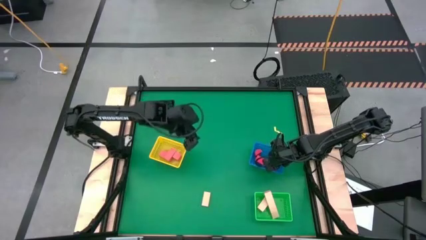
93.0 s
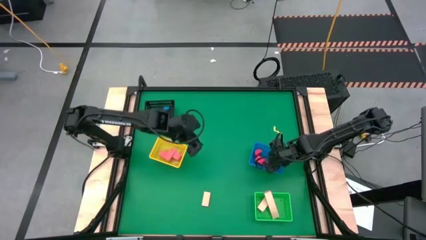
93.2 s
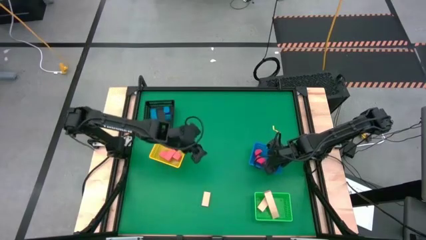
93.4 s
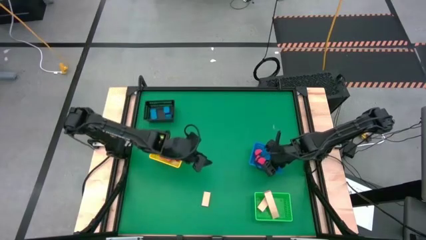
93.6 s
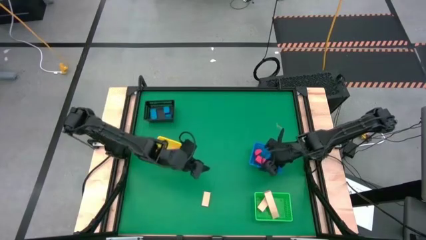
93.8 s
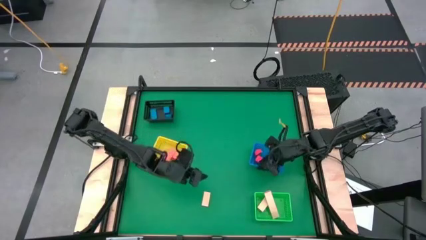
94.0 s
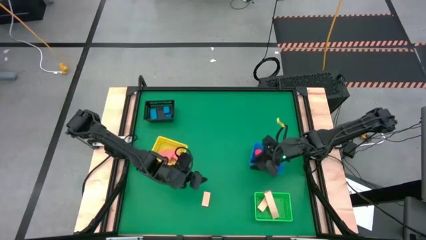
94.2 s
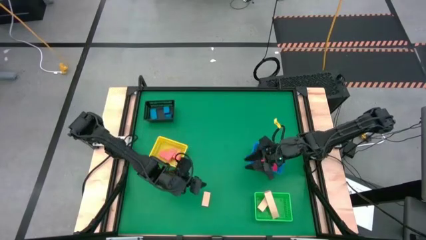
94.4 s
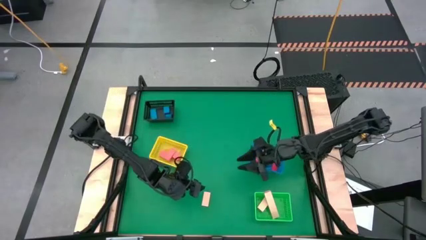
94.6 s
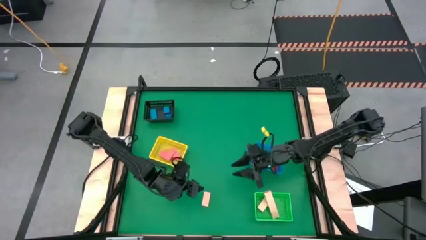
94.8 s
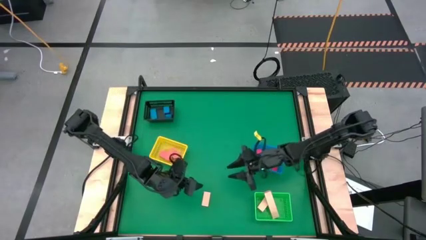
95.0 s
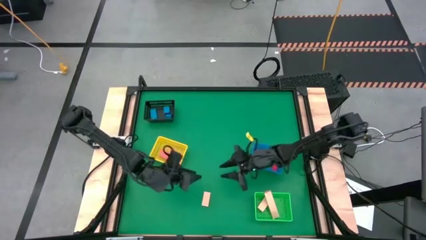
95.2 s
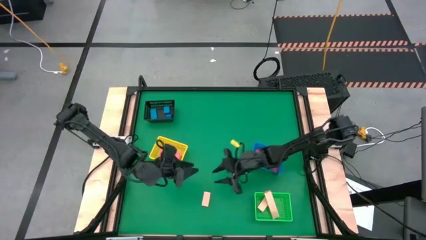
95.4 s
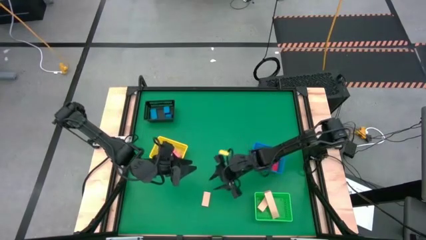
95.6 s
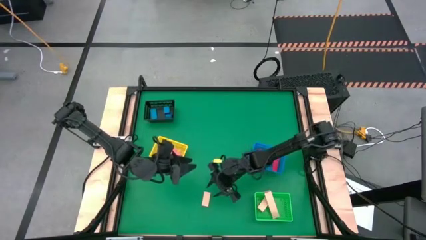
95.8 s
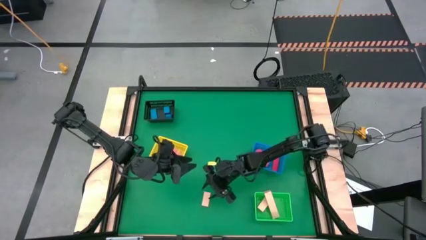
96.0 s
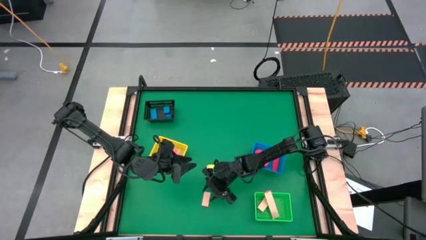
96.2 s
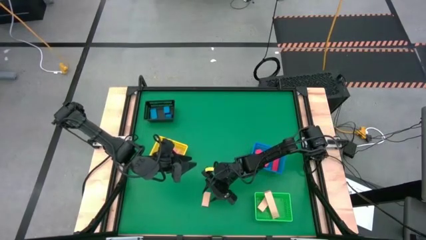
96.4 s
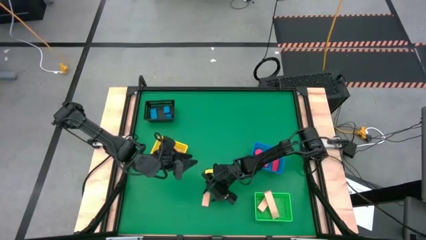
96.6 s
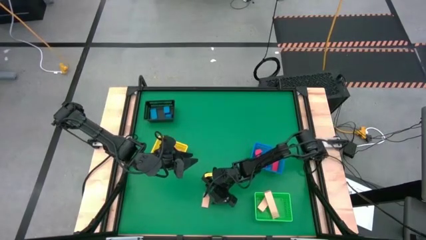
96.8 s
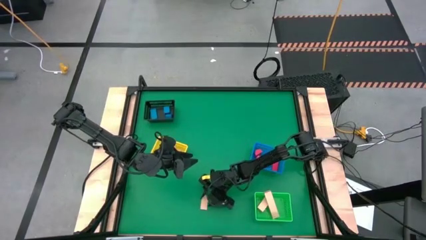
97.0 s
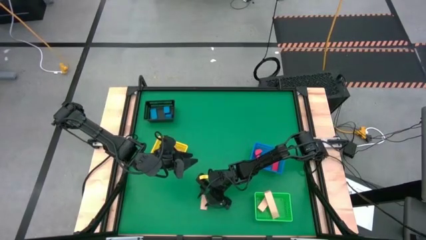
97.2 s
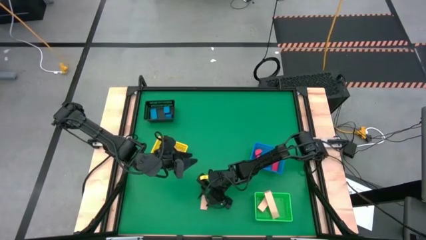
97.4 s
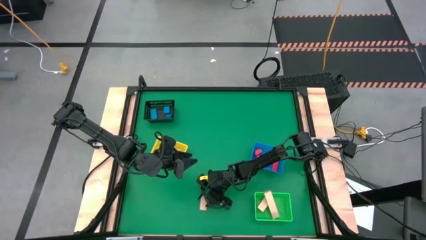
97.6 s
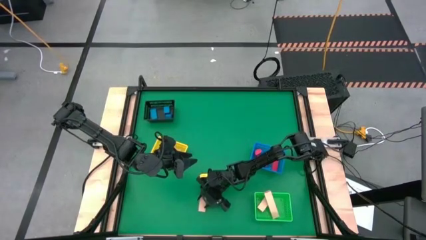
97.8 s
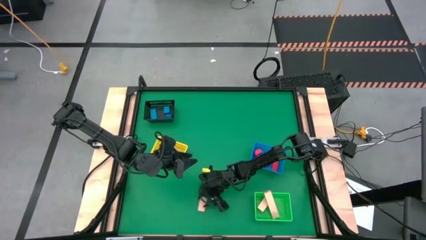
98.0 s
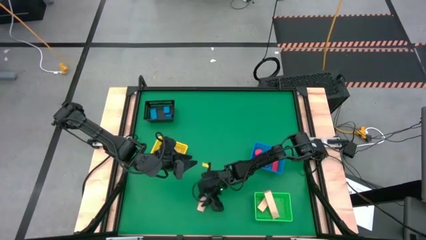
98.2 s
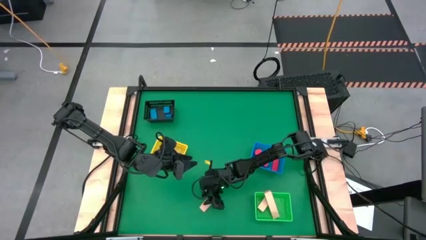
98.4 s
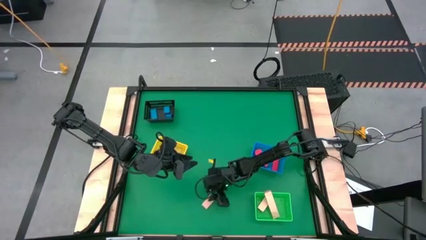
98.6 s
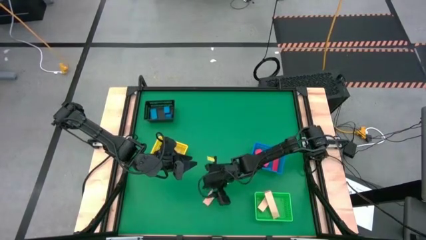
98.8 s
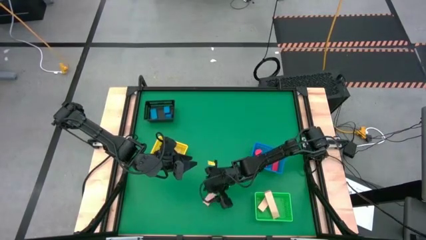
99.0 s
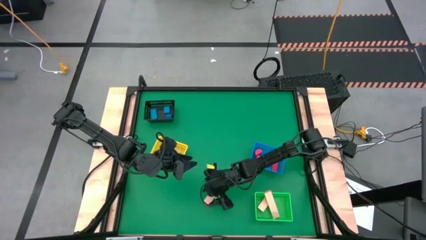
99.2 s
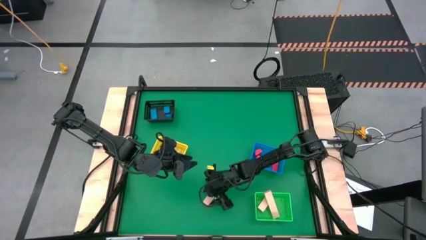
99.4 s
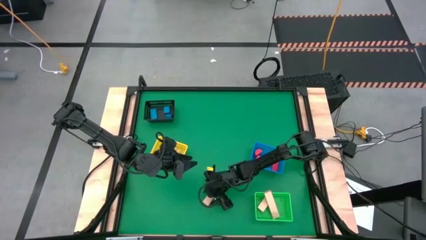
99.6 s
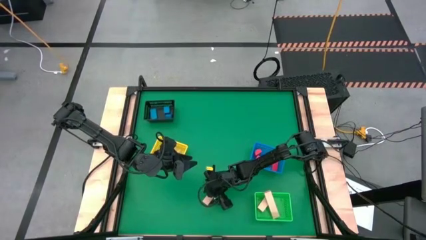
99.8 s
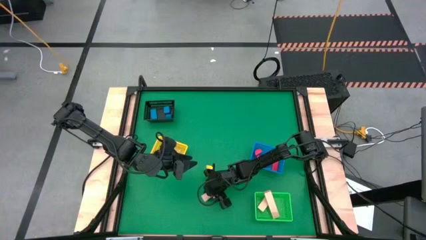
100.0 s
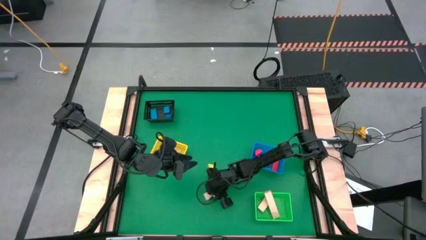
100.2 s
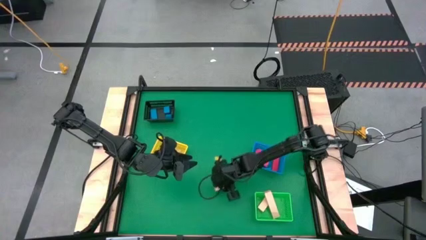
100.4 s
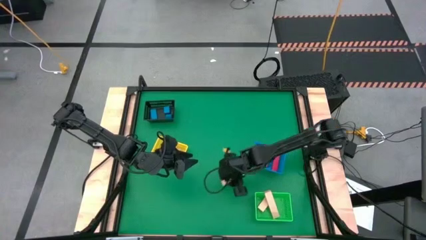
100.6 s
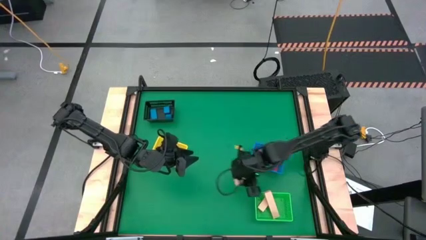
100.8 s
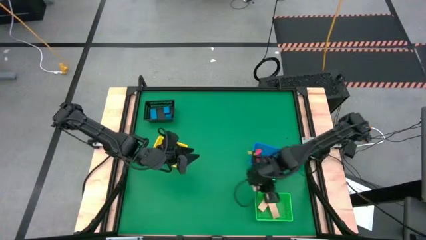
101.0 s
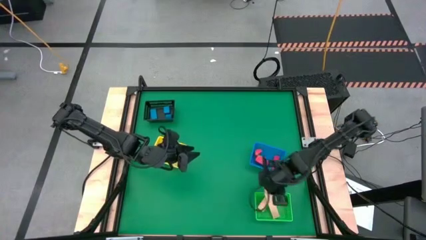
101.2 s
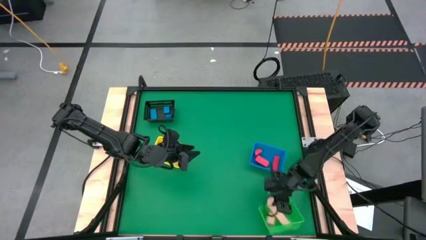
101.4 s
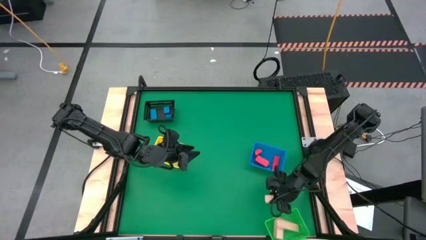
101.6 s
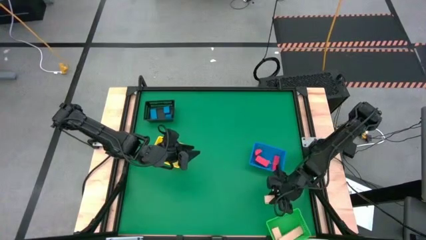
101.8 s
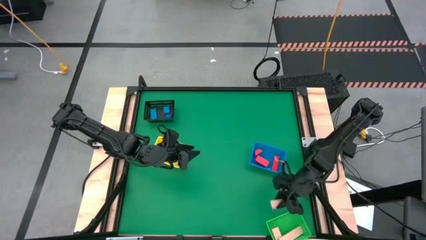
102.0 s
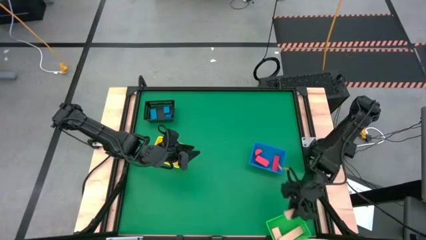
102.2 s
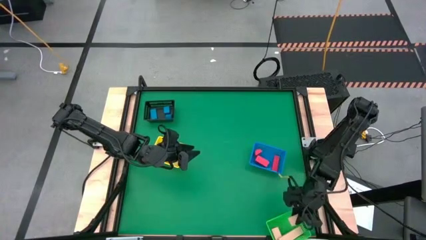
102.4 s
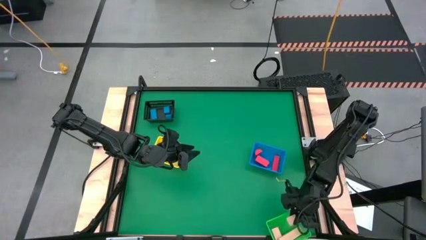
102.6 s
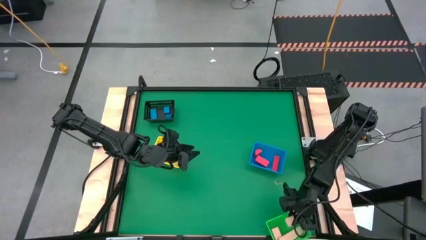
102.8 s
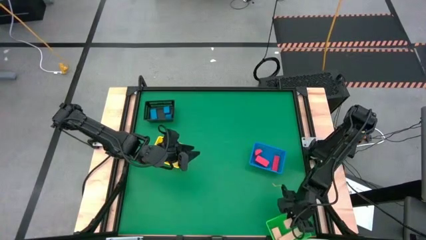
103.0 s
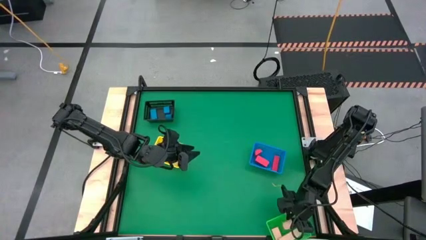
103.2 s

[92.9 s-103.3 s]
Task: Sort & place blocks by color
Put the beige rectangular block into the green basket

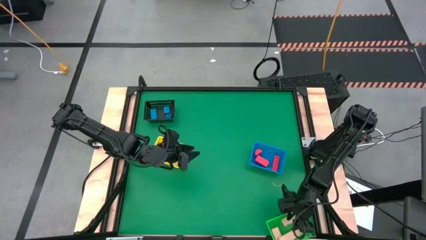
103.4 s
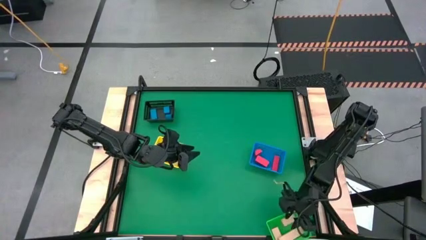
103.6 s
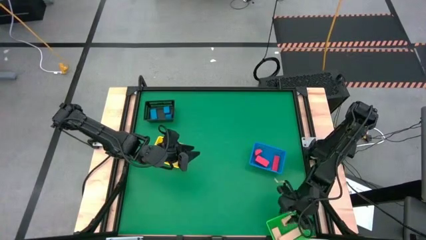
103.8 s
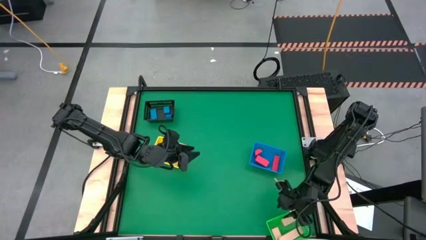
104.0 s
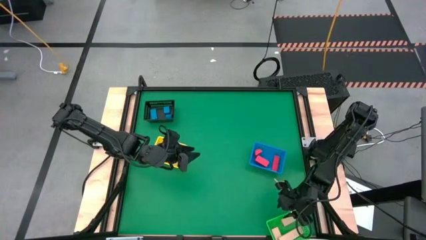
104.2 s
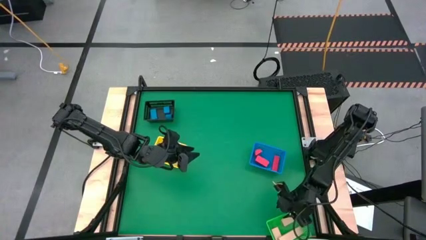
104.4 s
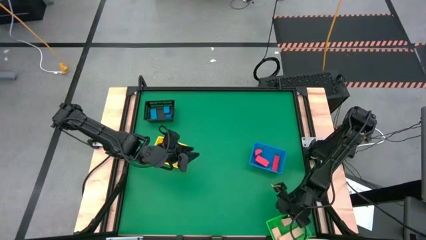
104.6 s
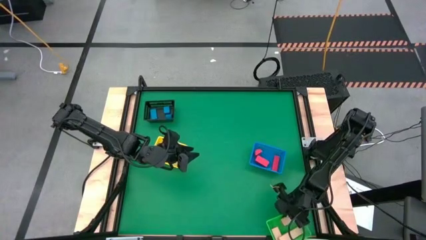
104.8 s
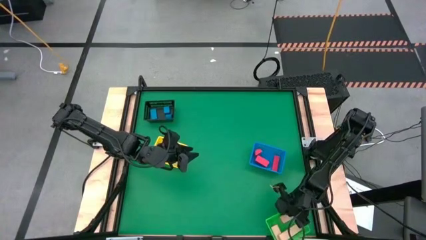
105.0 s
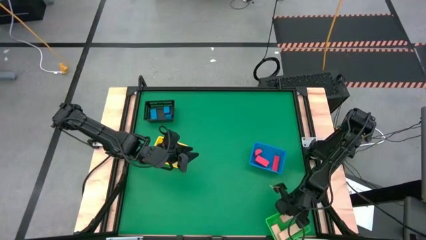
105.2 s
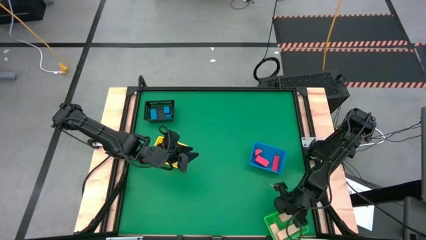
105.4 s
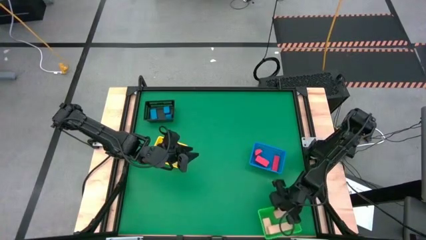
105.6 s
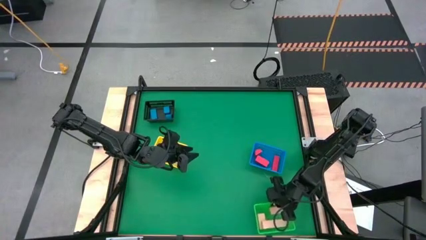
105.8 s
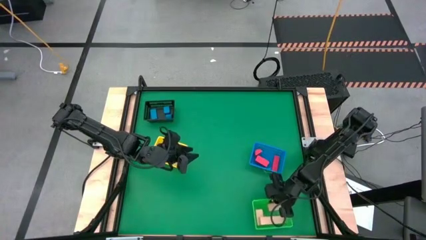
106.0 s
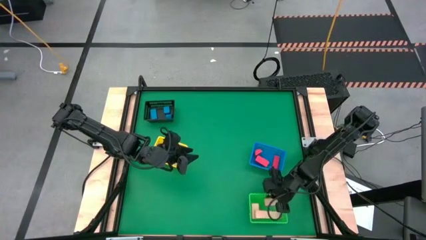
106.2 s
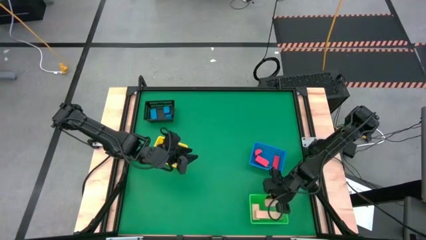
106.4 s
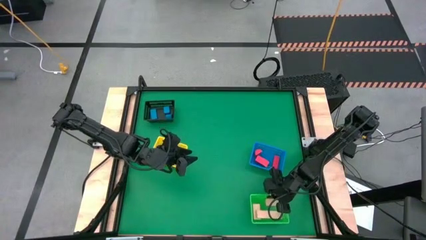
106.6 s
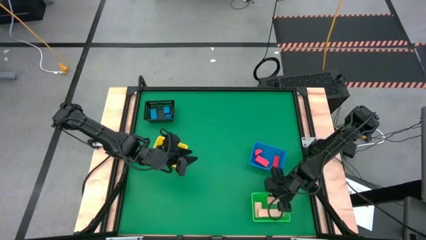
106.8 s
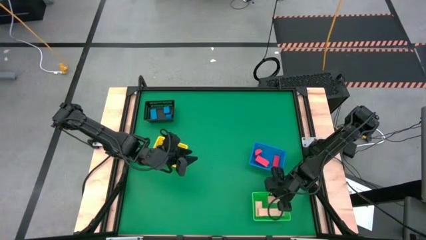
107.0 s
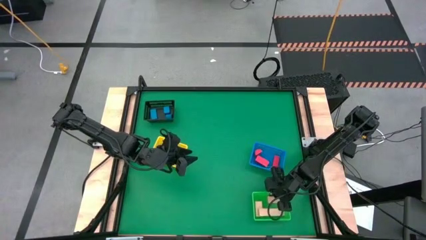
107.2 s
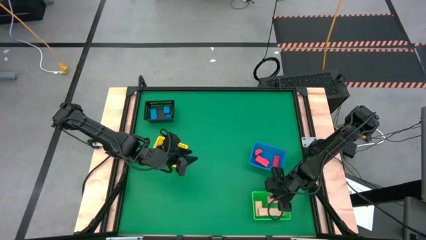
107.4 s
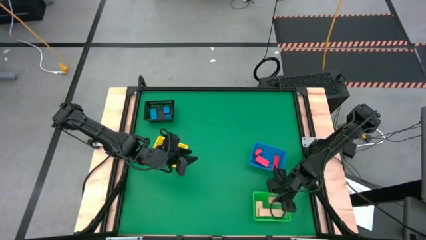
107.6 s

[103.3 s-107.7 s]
Adjust the green basket
